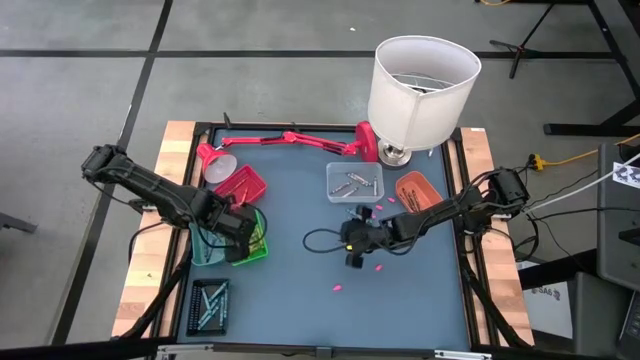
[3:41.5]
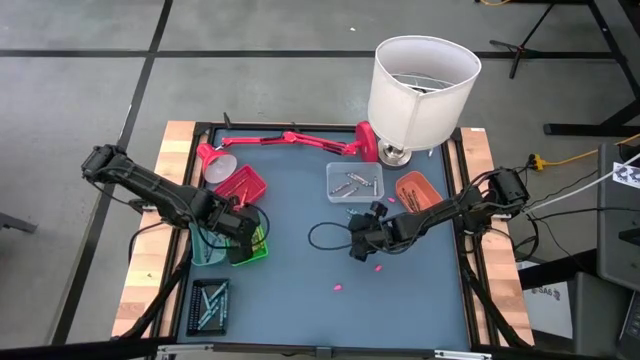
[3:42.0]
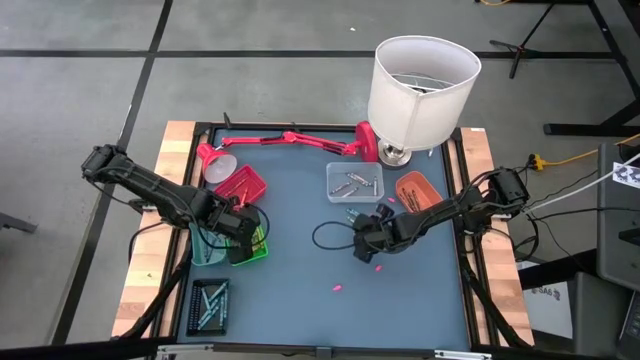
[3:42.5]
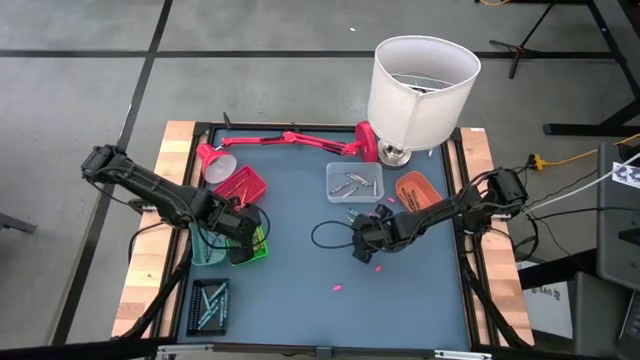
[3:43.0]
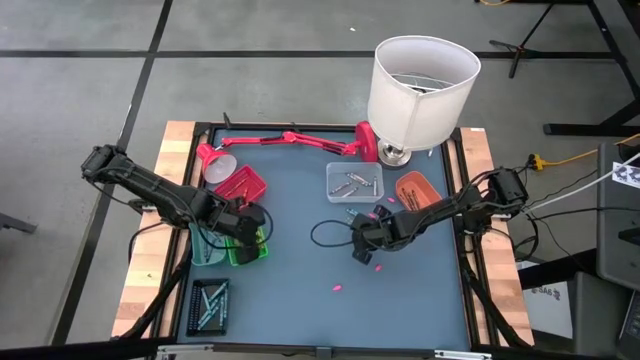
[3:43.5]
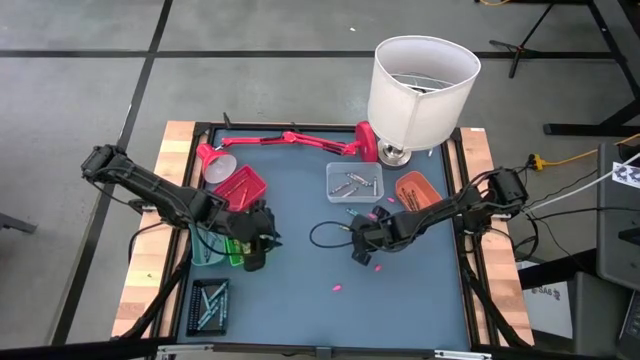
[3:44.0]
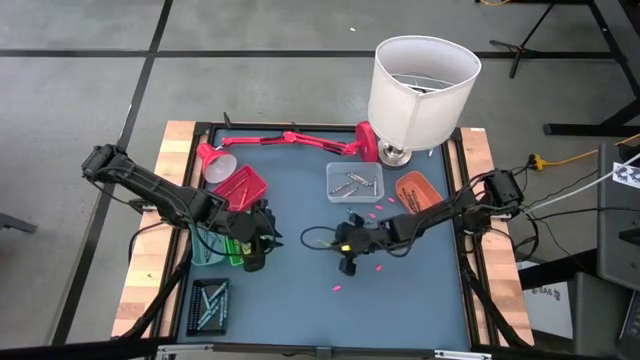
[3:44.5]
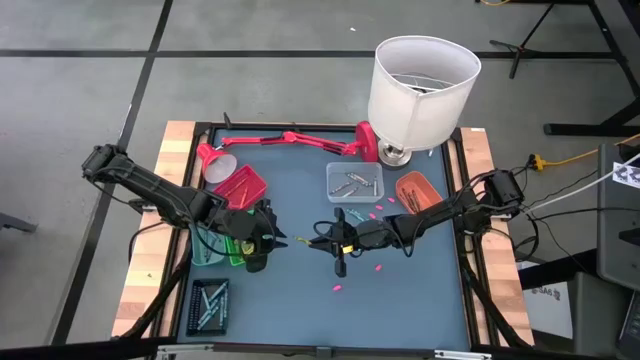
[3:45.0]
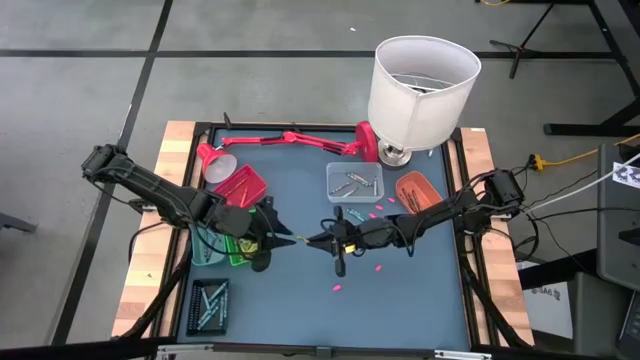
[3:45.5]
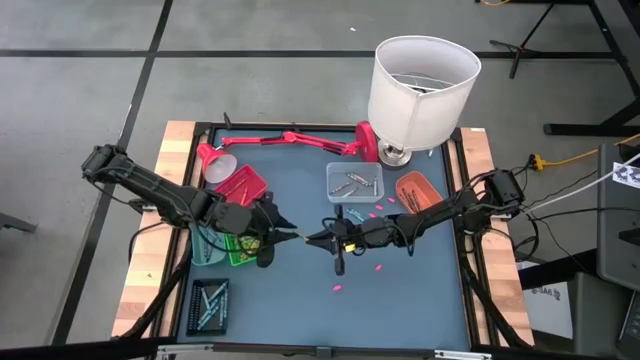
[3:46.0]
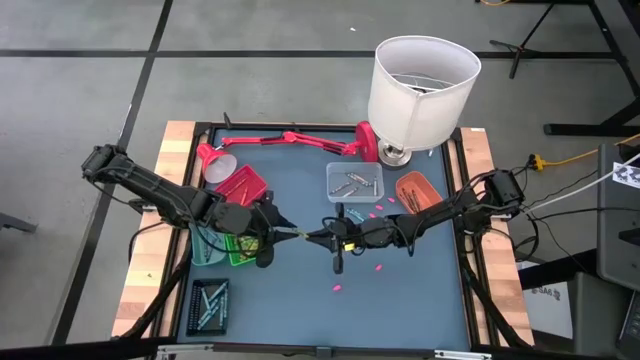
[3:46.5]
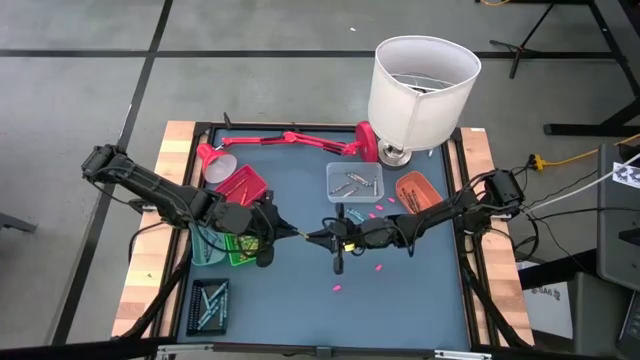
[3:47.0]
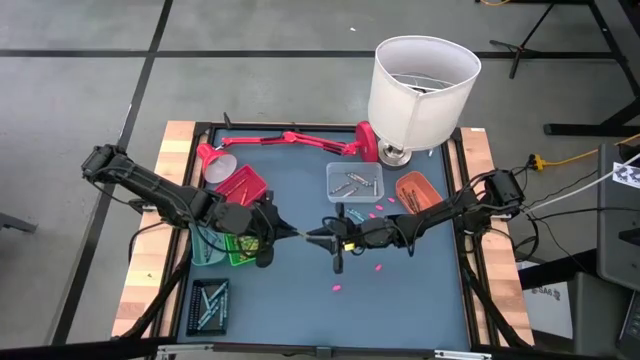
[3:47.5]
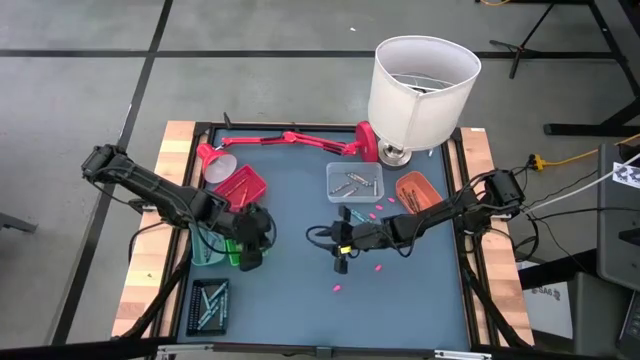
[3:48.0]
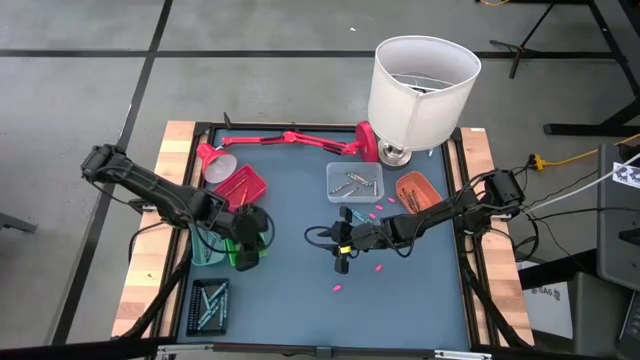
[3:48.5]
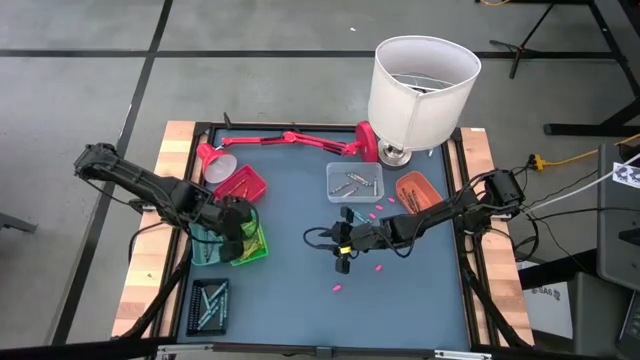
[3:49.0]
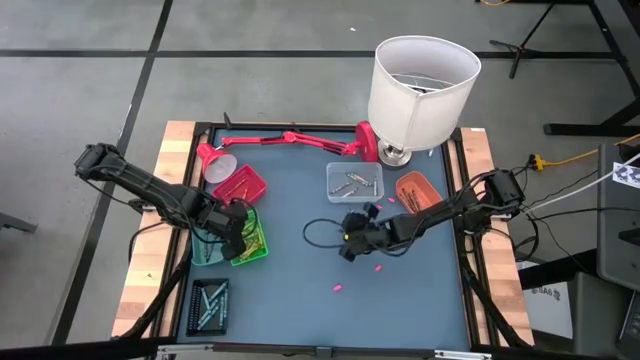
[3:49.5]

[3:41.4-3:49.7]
Task: Sort crayons
Put the green crayon into the green bin

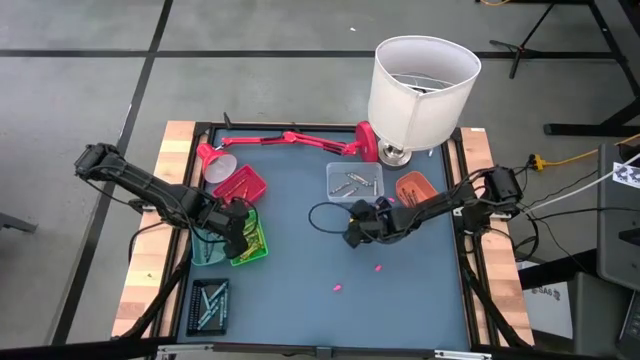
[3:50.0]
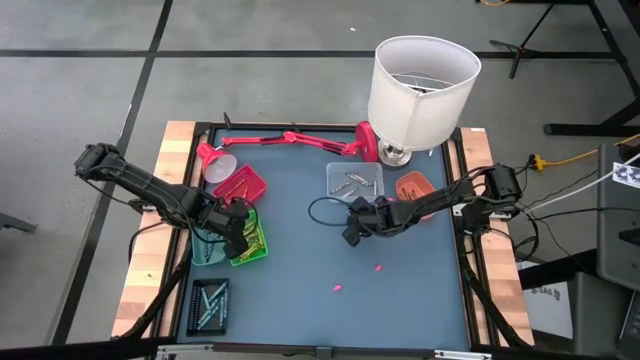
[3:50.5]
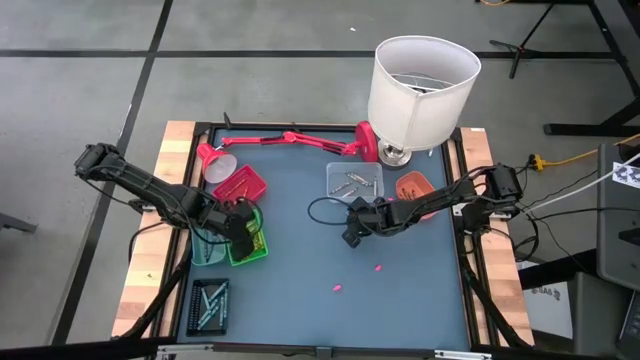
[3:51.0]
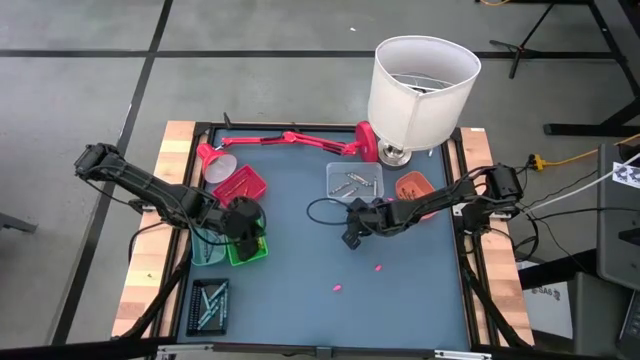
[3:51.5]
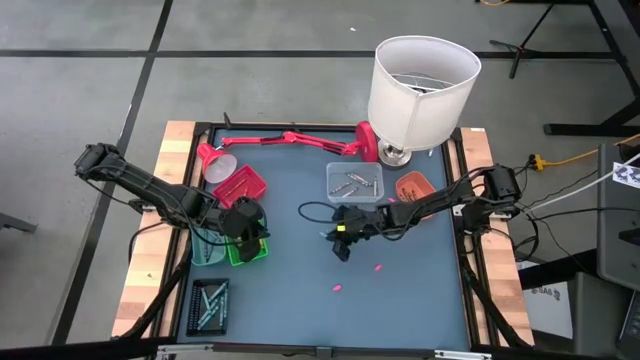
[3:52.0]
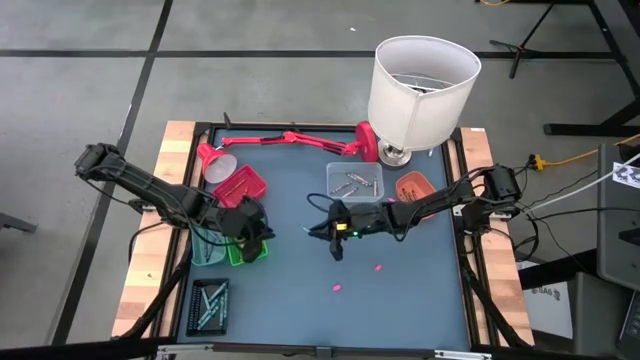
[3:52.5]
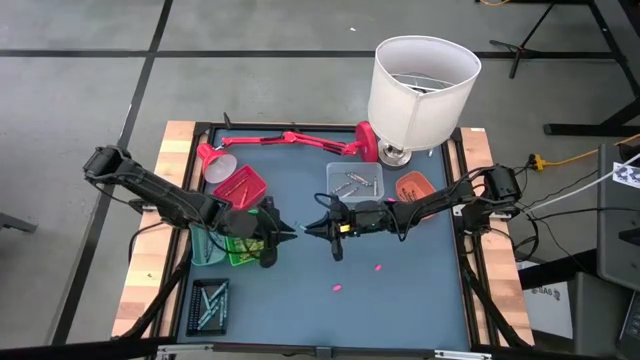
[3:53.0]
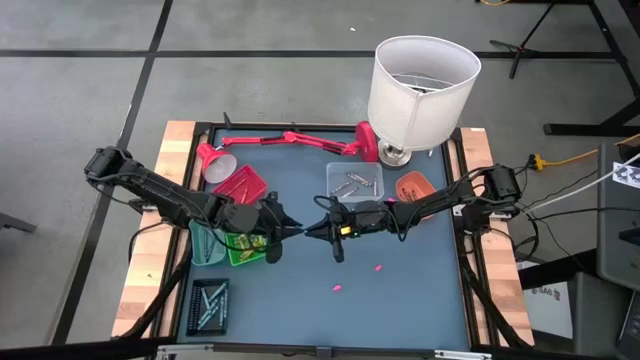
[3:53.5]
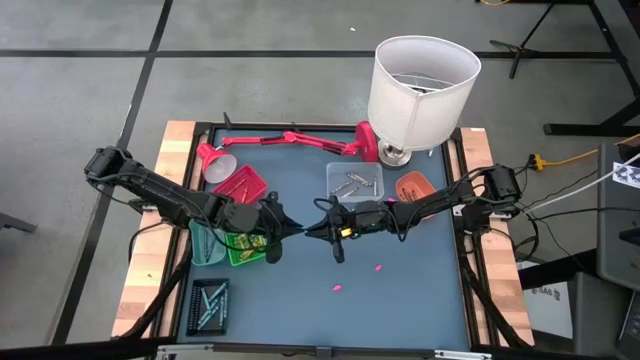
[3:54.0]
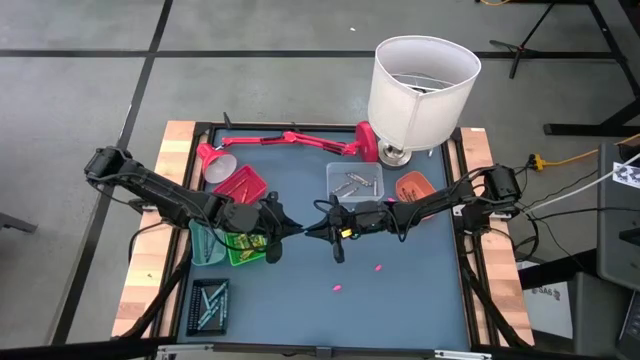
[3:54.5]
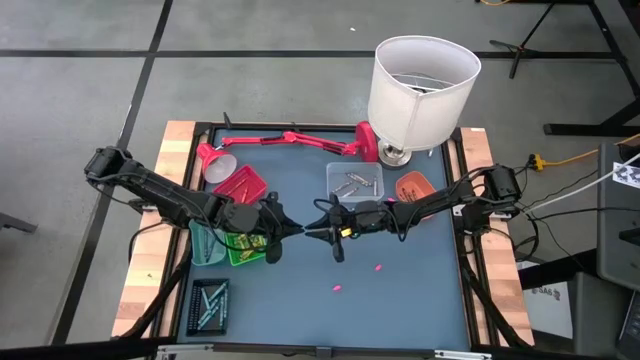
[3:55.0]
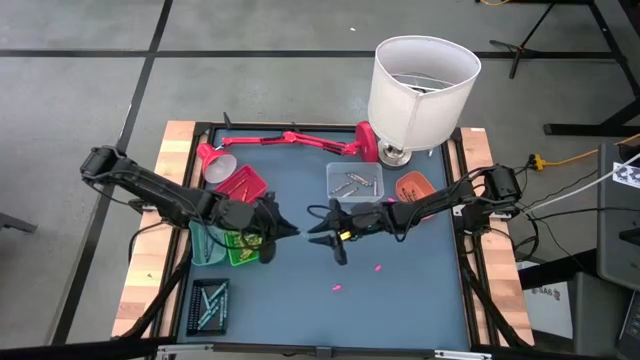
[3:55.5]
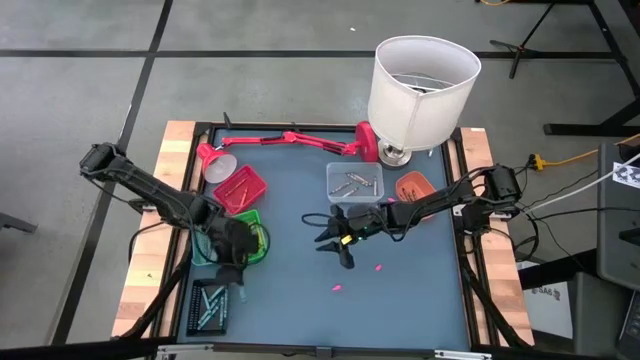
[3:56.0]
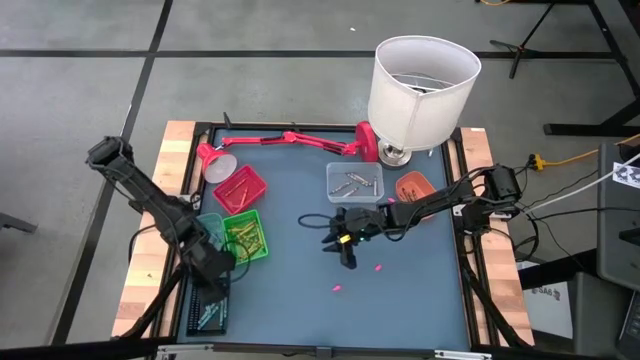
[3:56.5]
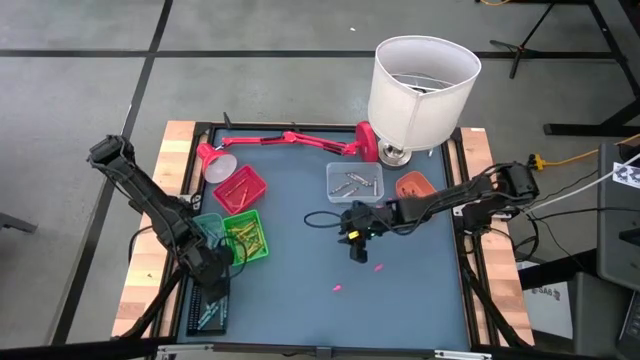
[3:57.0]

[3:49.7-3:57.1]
Put the dark green crayon into the black bin

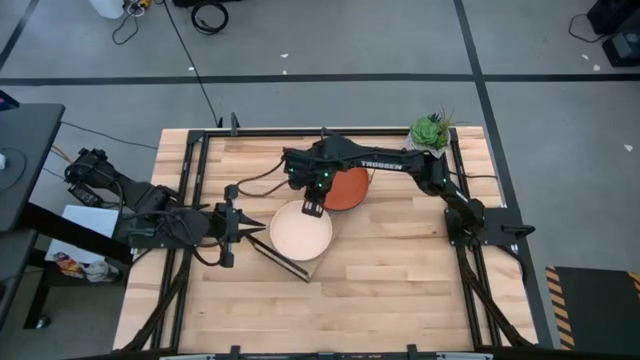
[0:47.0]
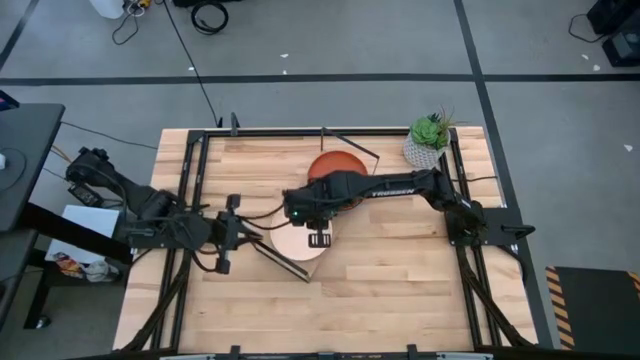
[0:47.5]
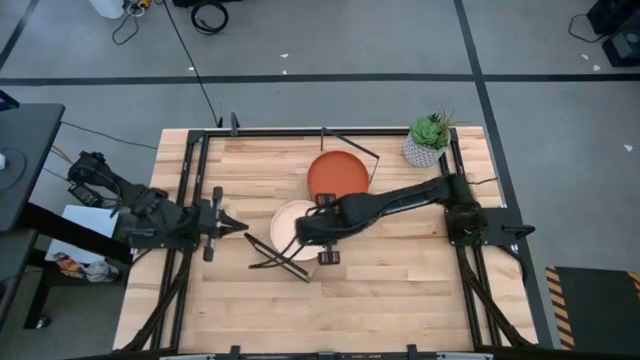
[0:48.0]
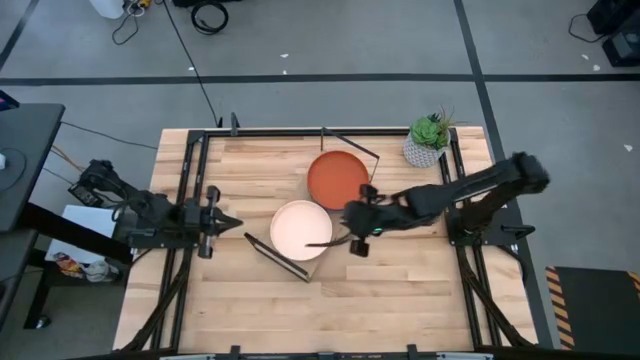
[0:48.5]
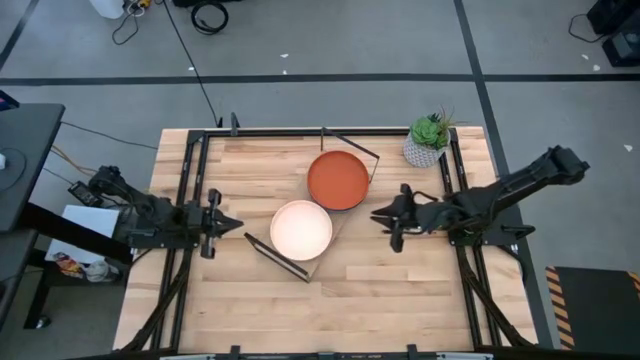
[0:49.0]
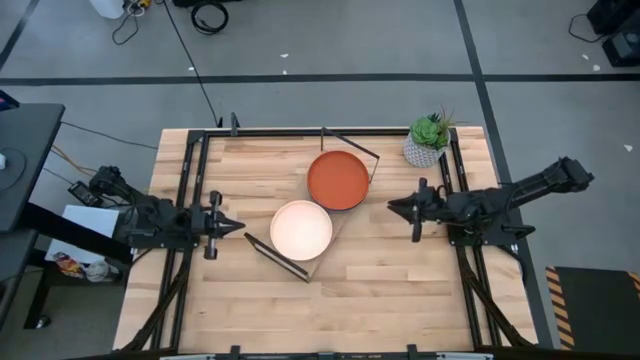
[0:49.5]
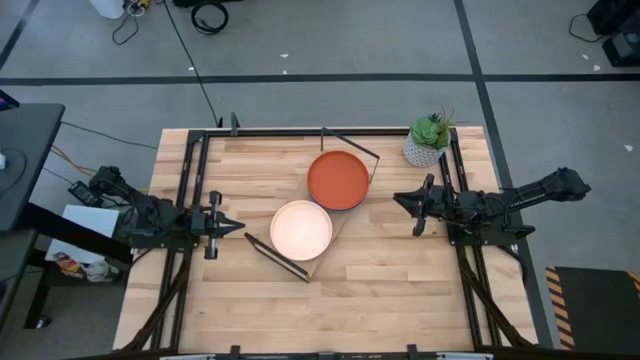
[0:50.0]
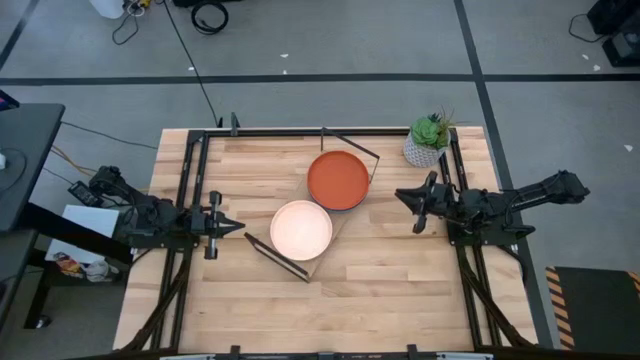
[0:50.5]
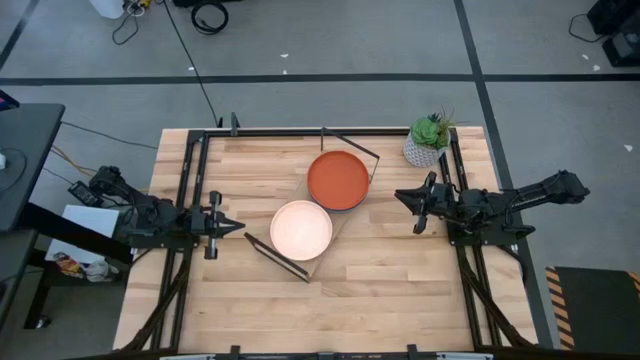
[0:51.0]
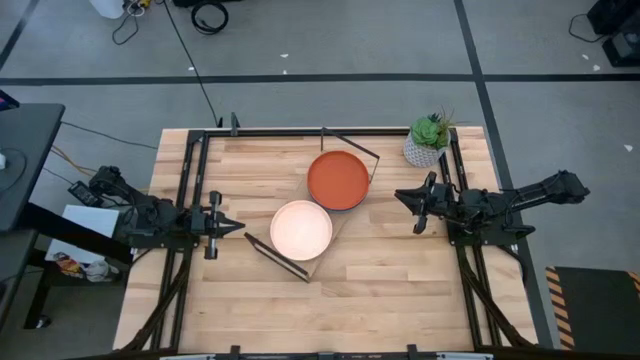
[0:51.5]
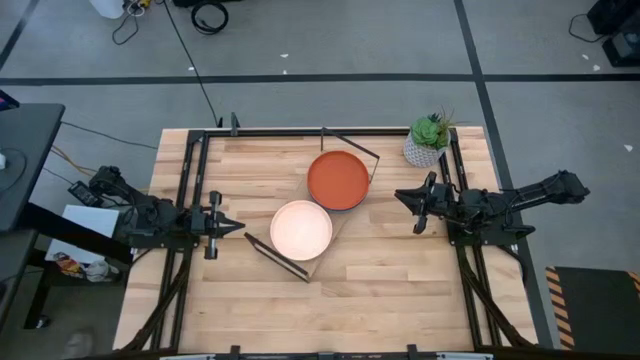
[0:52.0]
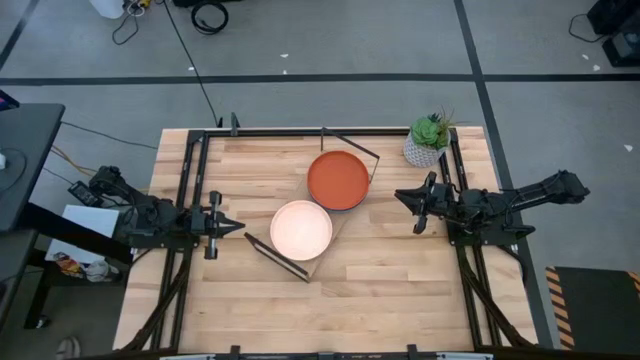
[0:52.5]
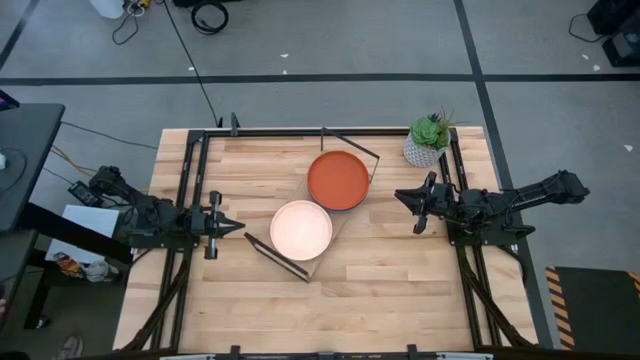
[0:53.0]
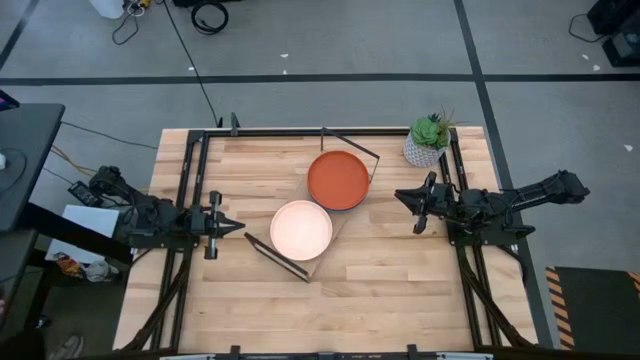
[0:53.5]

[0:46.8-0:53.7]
Task: Place and stack plates onto a shelf
Return to Home Position
